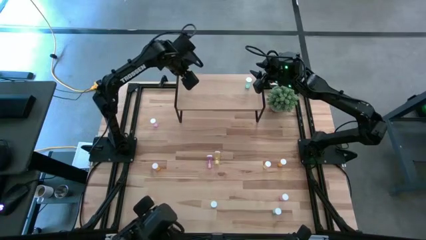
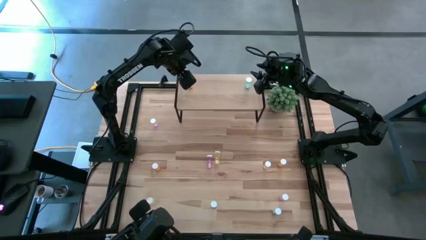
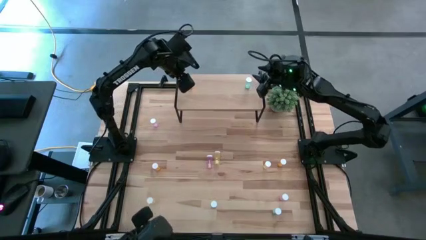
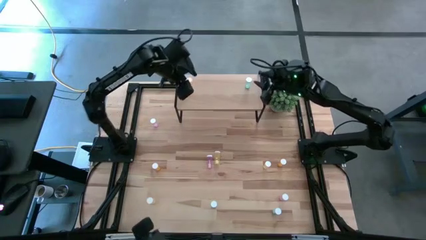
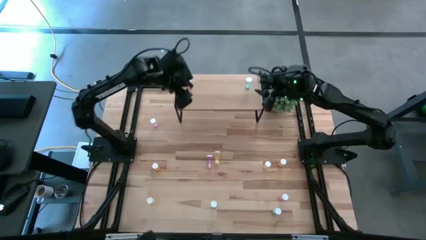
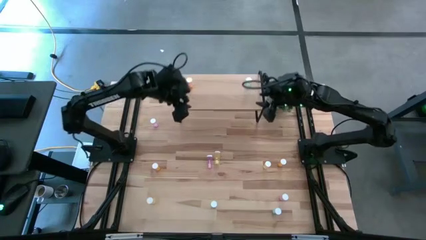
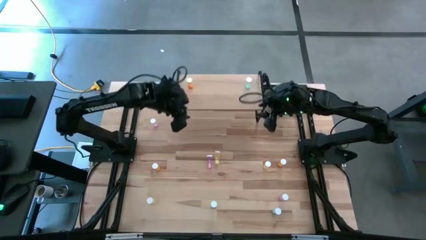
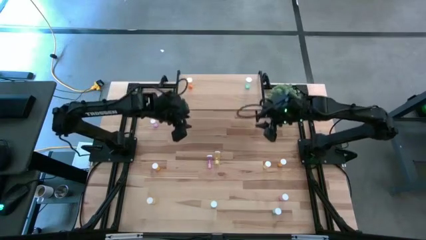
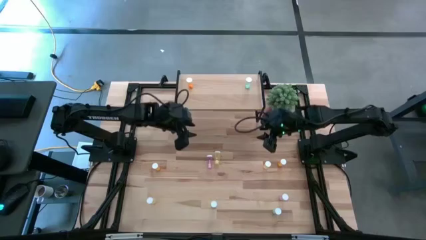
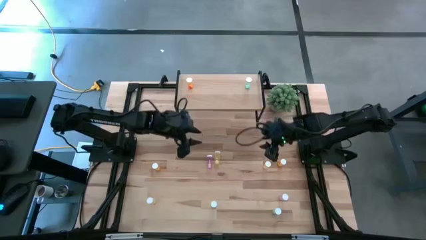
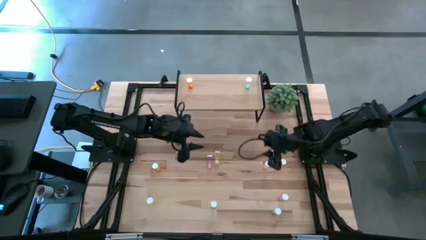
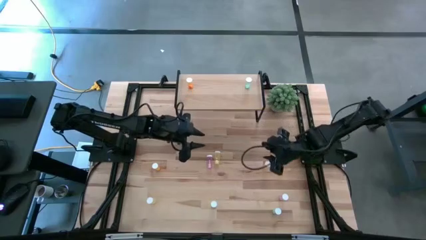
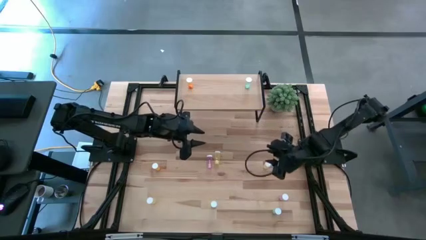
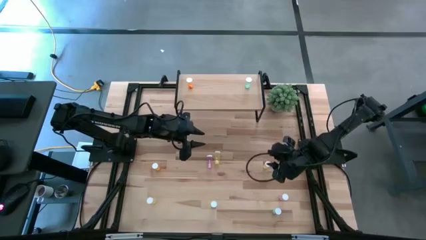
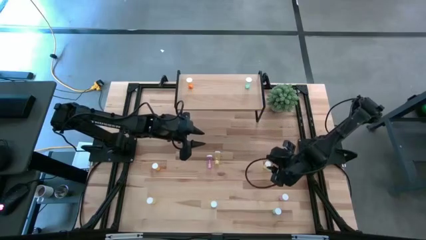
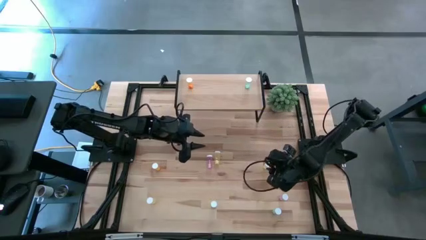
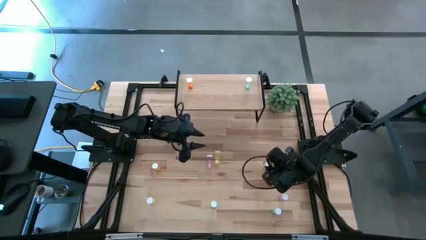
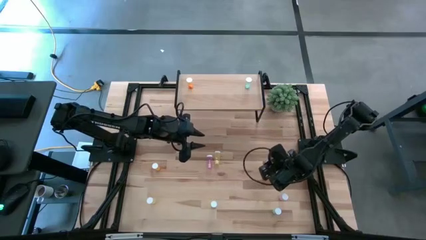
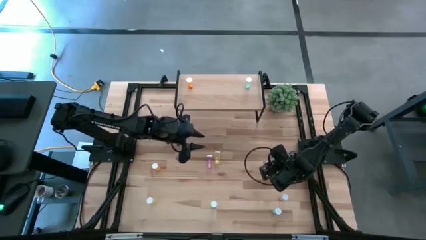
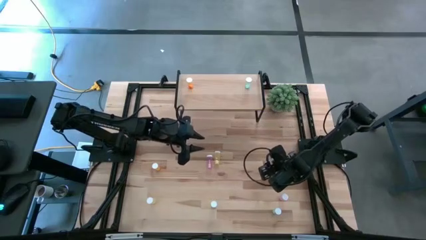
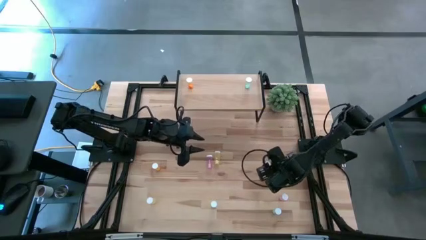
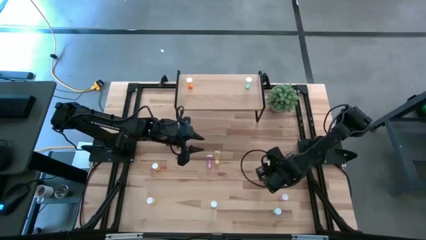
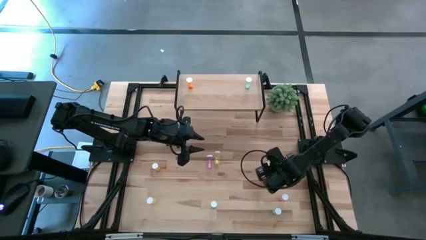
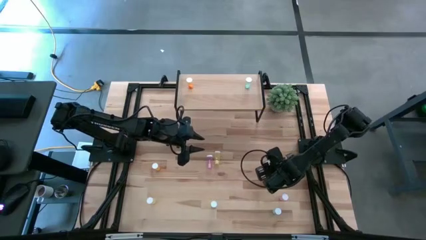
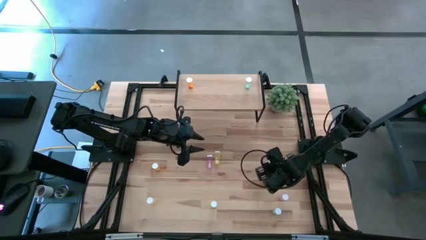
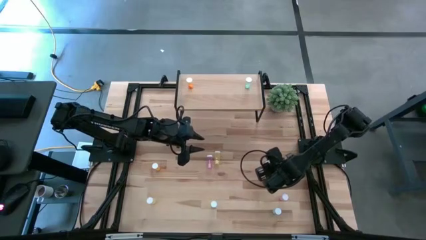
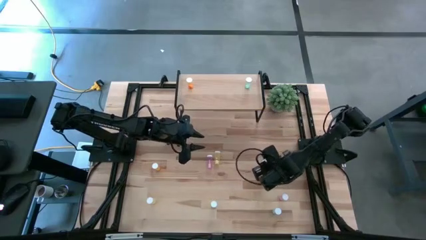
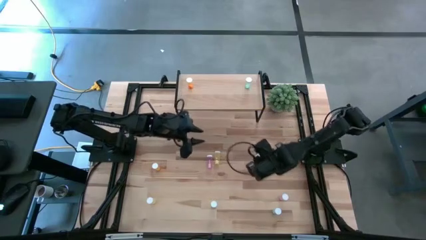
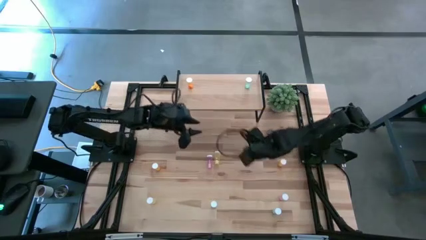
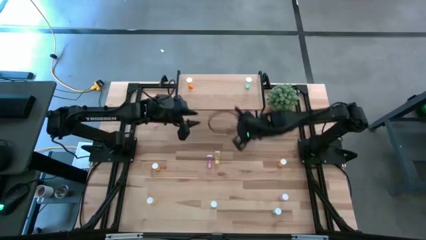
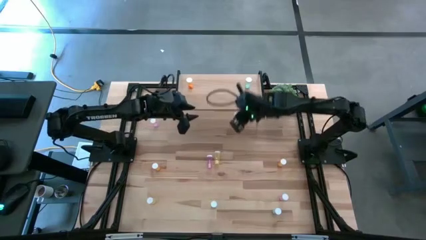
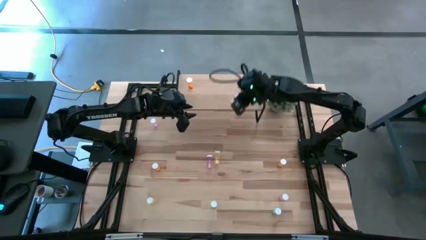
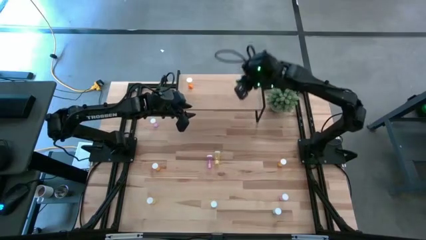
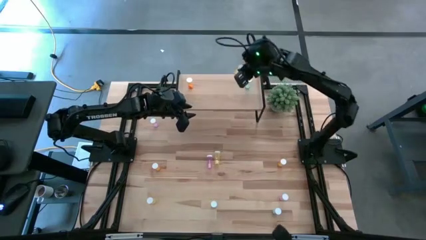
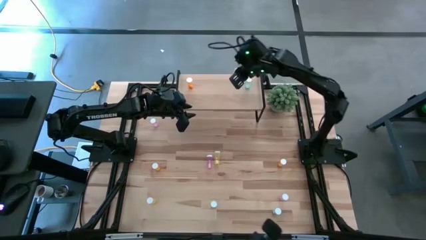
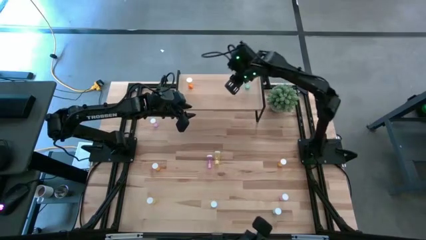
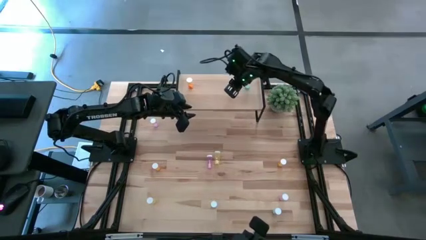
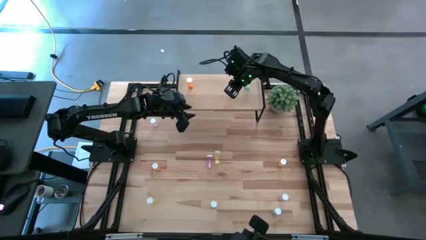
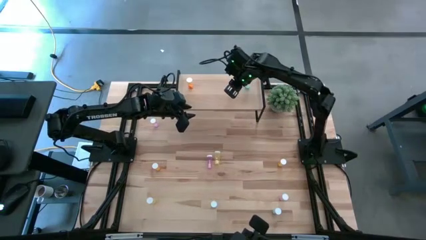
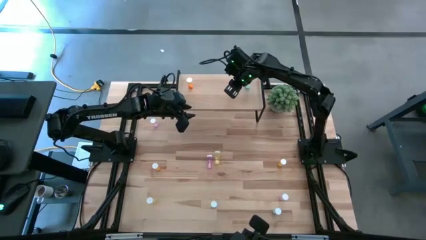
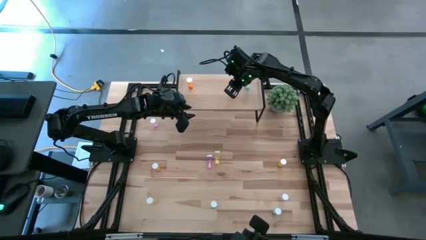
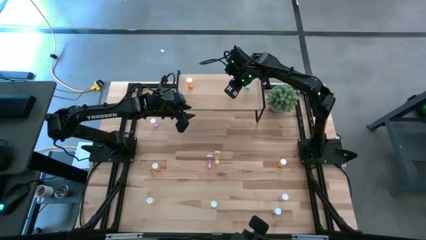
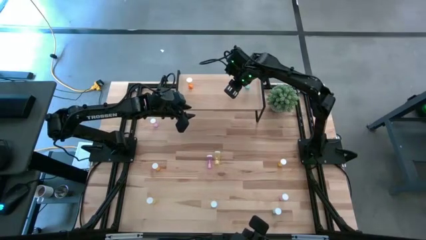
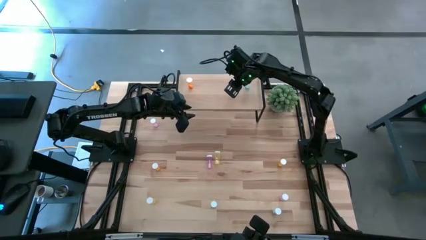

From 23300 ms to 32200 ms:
Task: Pick and place medicine bottles onto shelf by color
Put the top right yellow pill bottle on the shelf

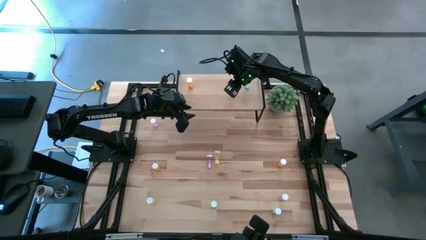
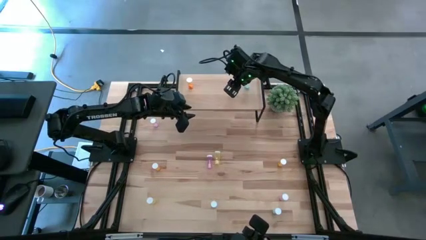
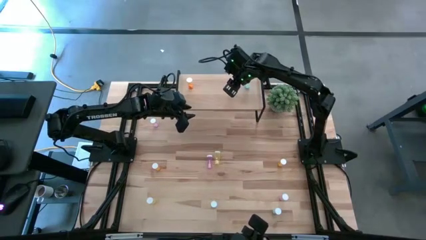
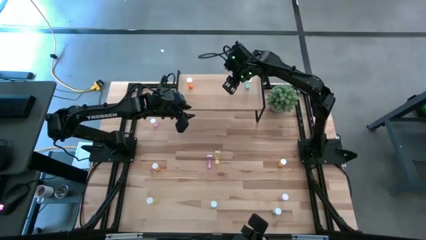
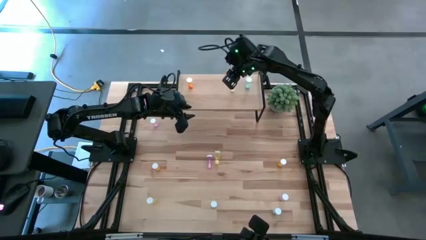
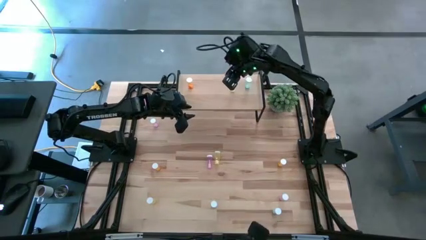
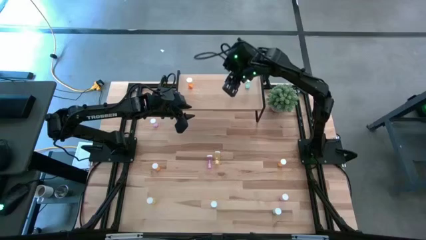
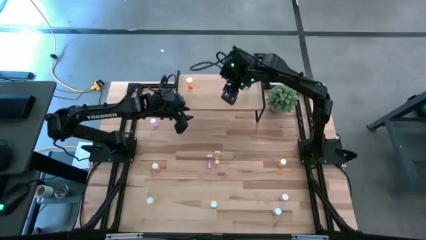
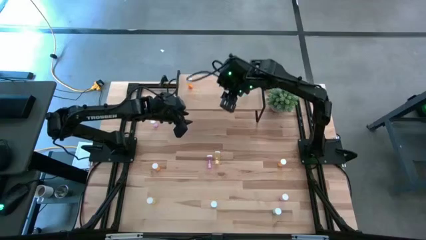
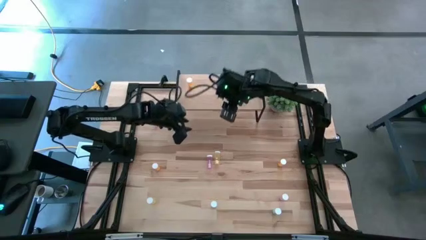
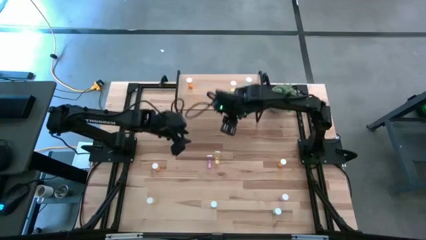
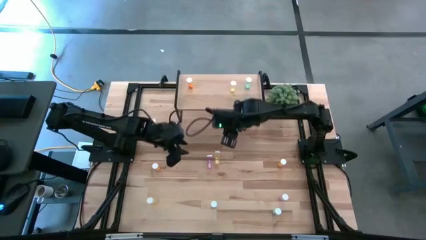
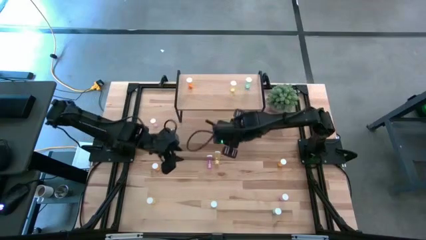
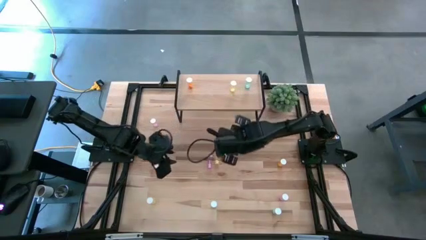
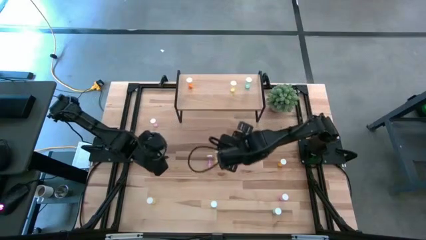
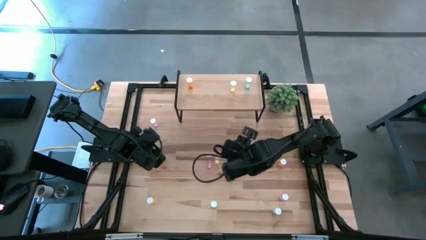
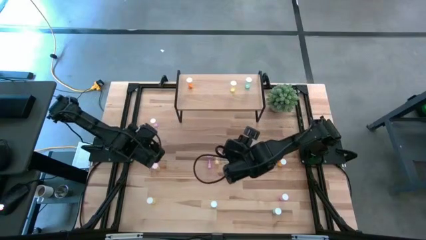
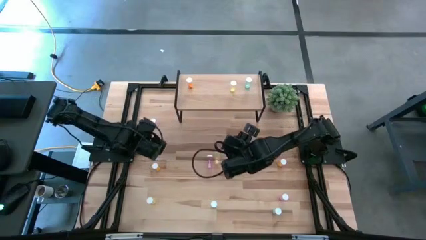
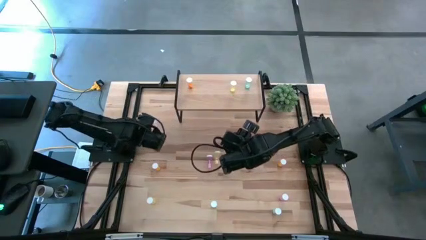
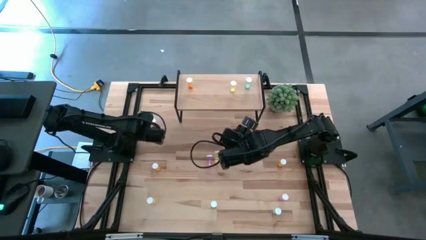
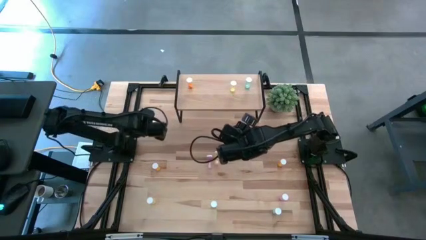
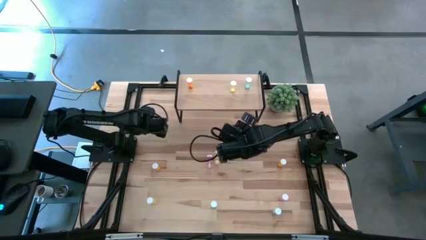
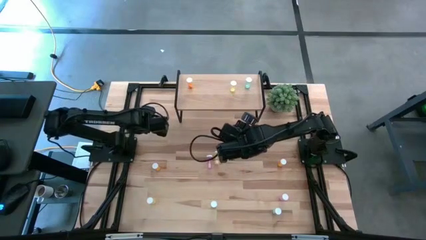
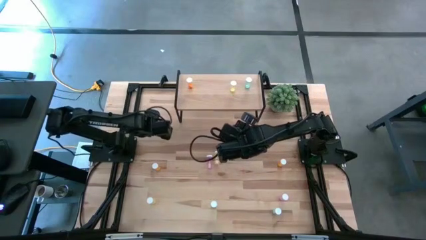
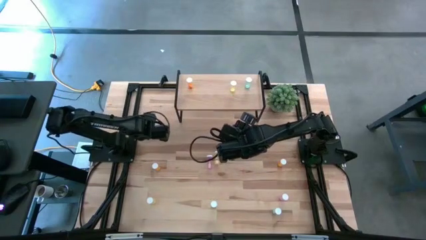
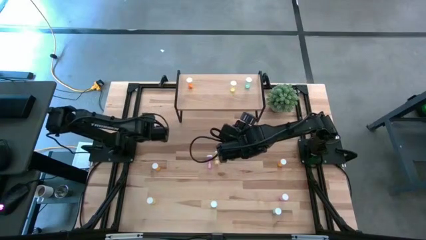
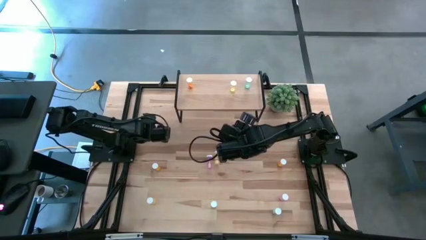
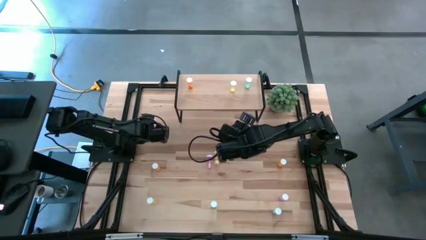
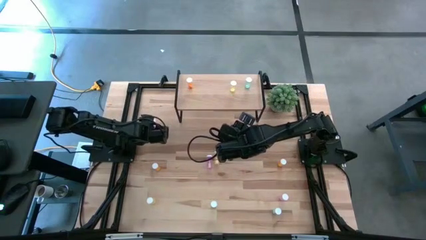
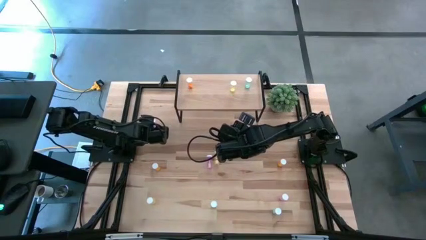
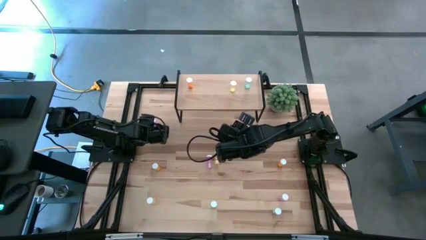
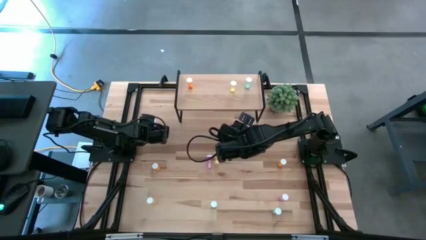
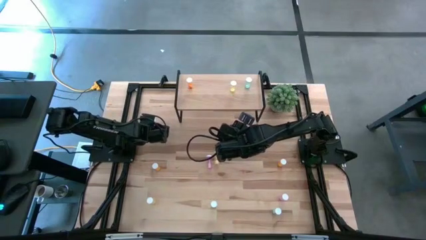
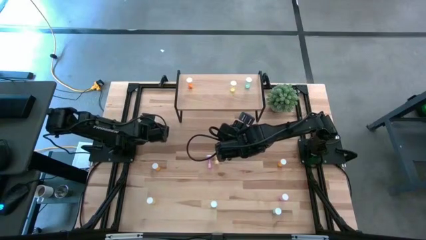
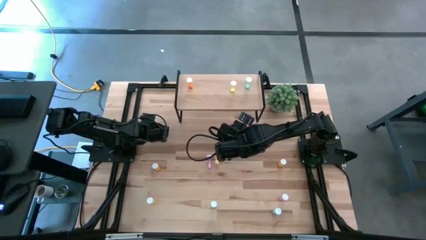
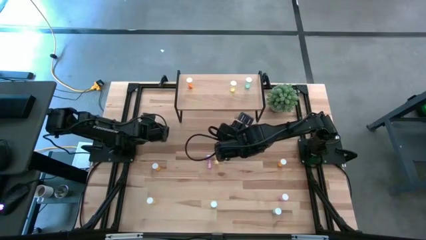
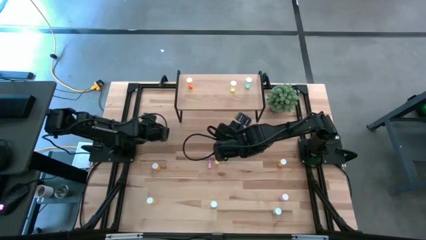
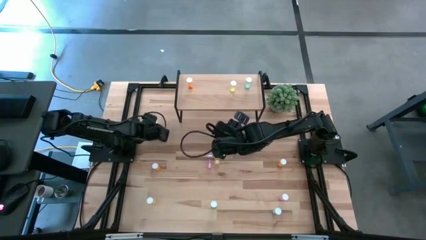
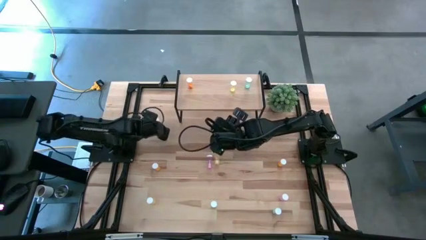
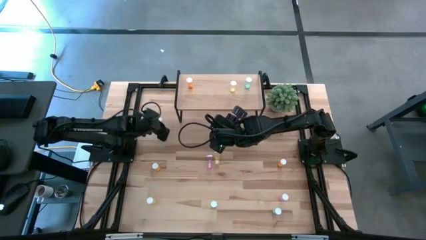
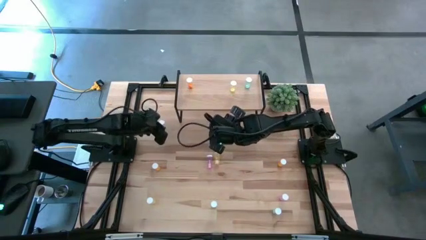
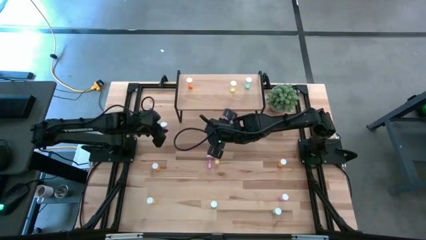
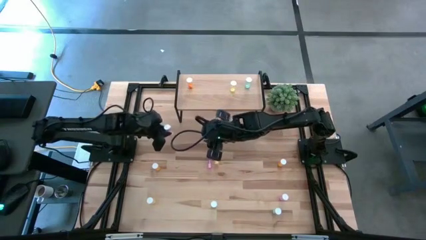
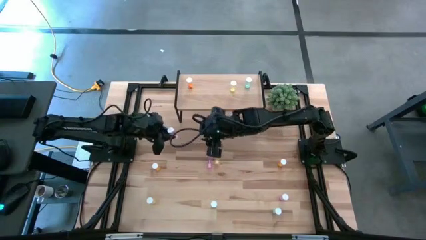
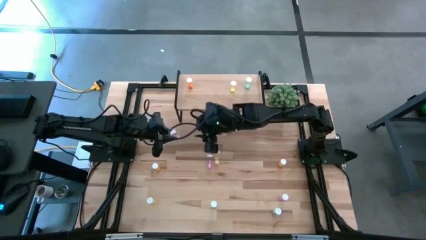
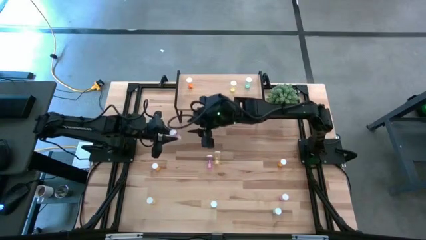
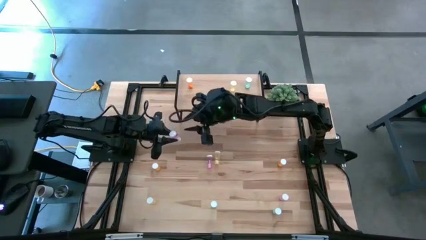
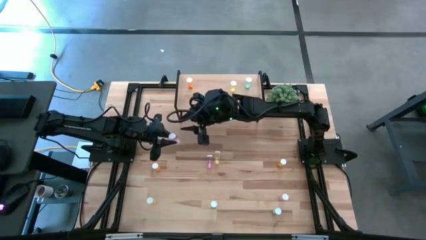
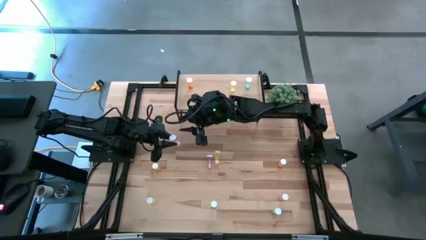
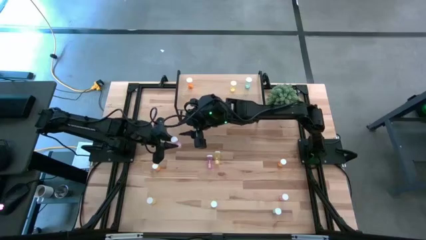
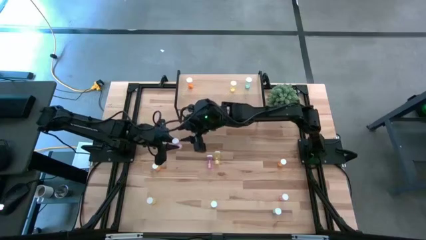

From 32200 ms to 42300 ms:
Put the top pink pill bottle on the shelf
